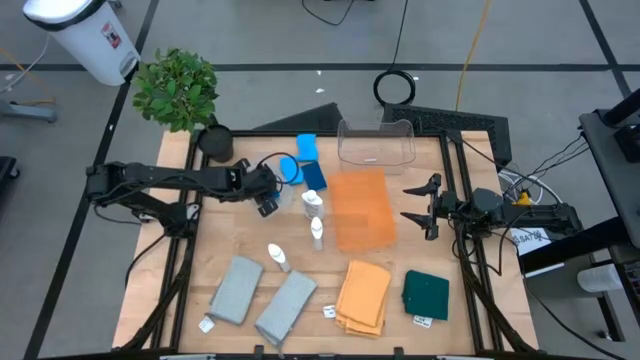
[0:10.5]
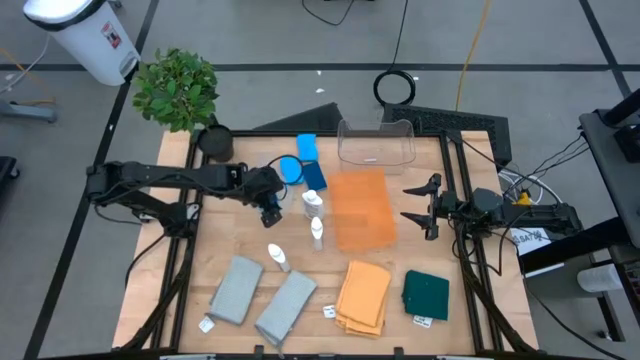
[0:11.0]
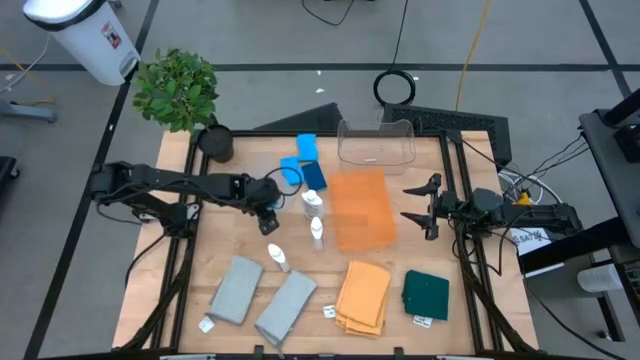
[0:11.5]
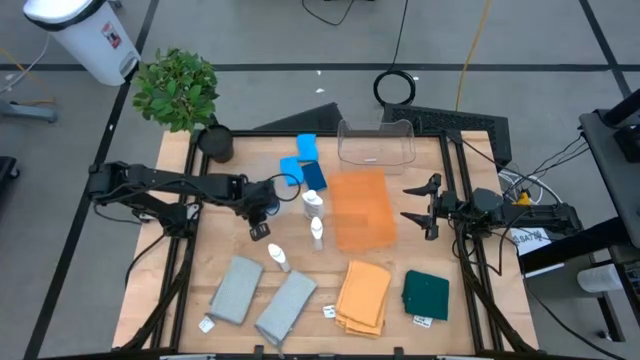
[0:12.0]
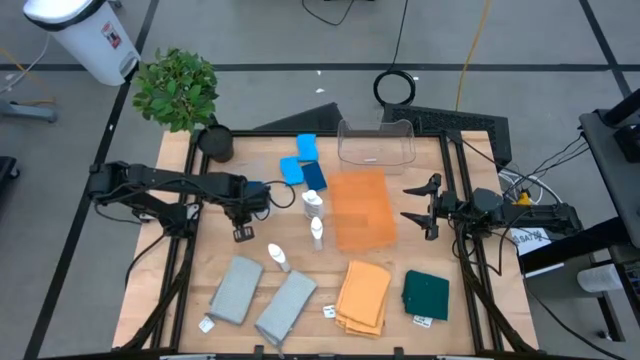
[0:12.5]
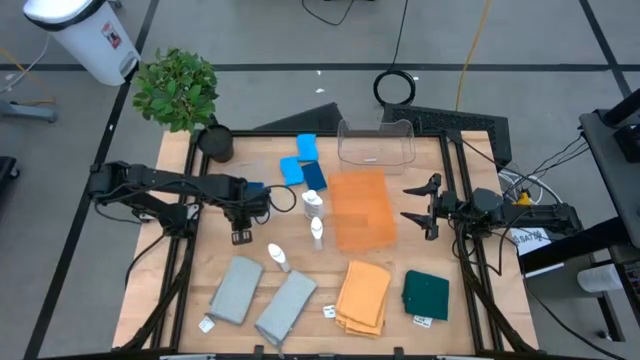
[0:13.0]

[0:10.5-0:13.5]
Task: Pick & Place Kitchen Items
Adjust the white bin

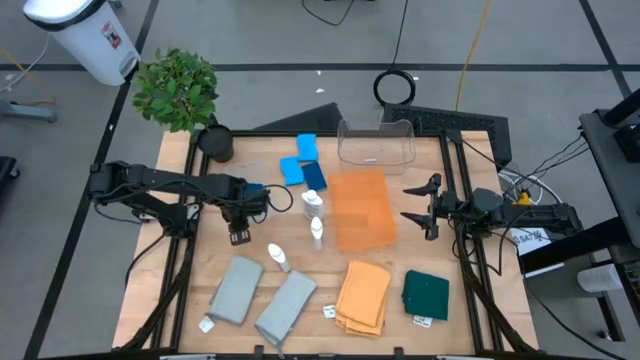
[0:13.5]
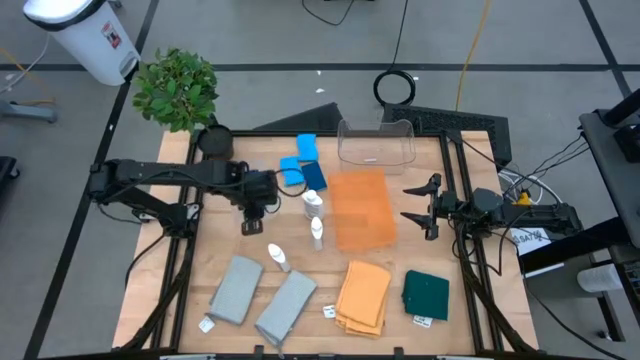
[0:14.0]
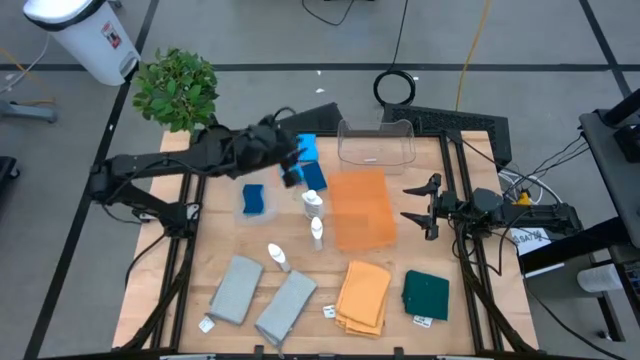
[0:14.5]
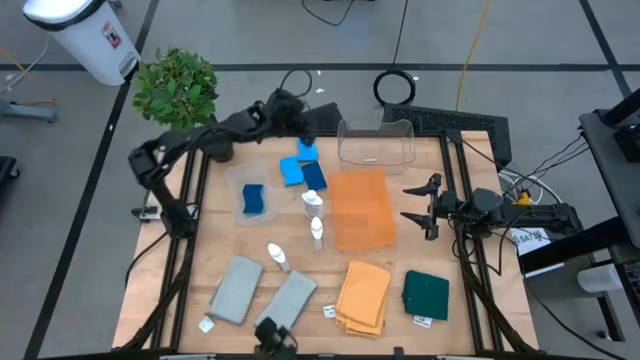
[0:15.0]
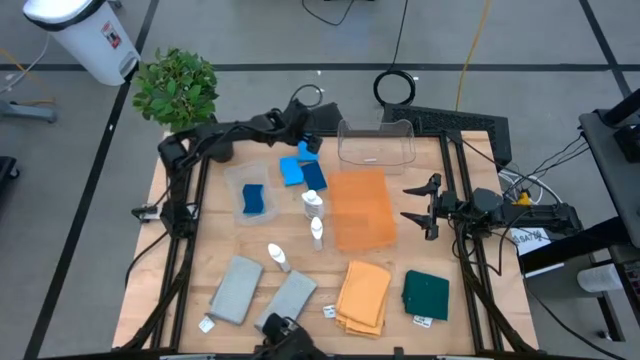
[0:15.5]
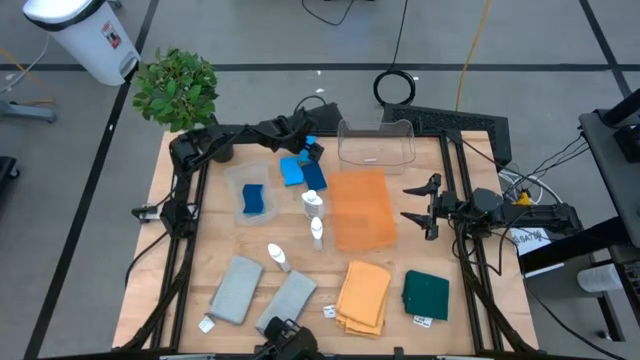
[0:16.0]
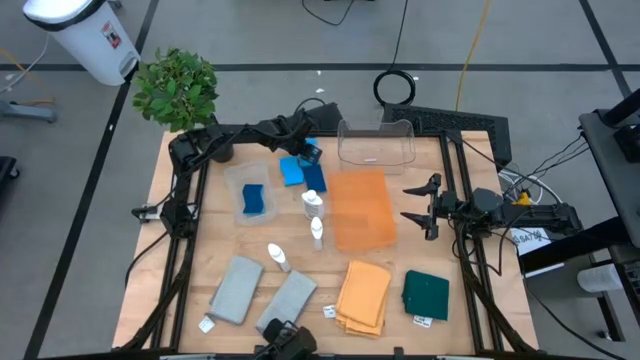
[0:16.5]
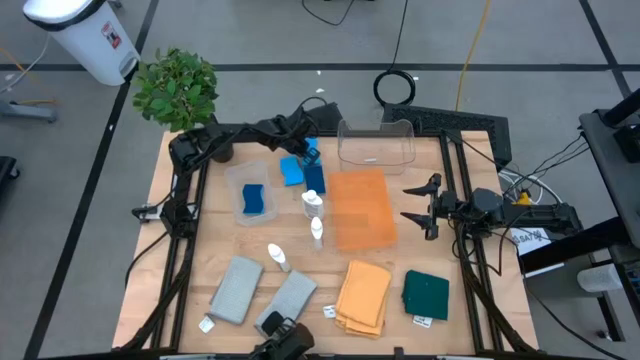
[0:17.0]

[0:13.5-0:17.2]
Put the blue sponge into the white bin

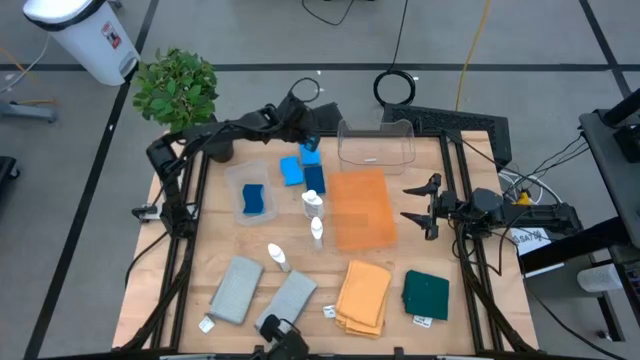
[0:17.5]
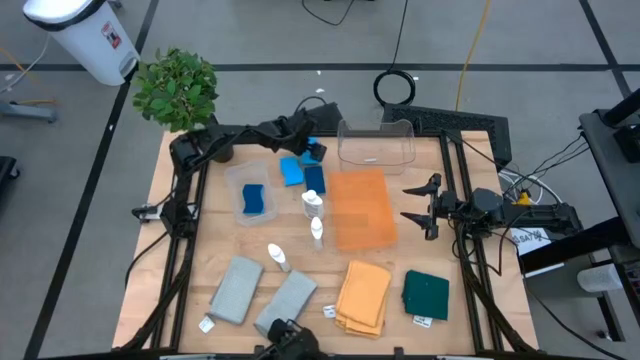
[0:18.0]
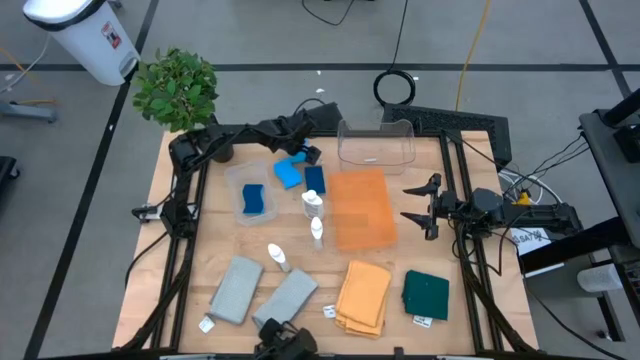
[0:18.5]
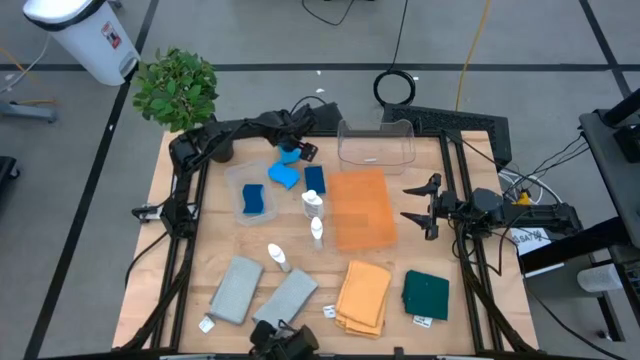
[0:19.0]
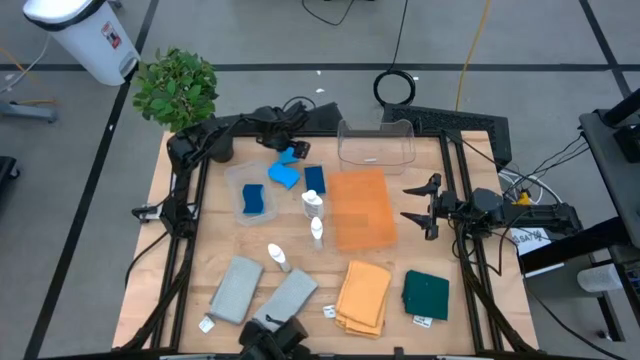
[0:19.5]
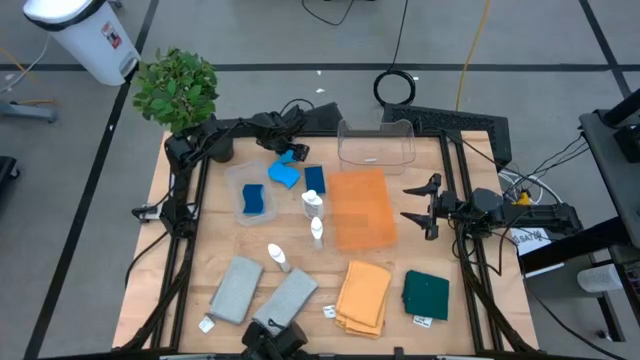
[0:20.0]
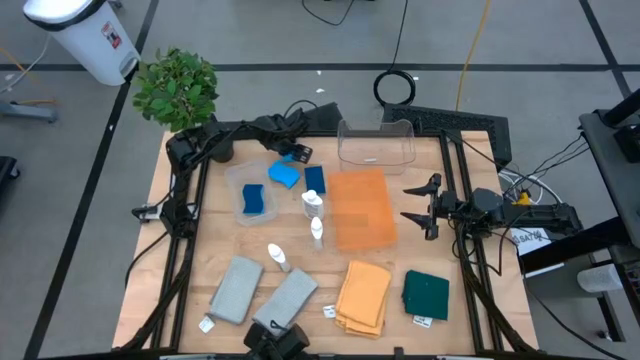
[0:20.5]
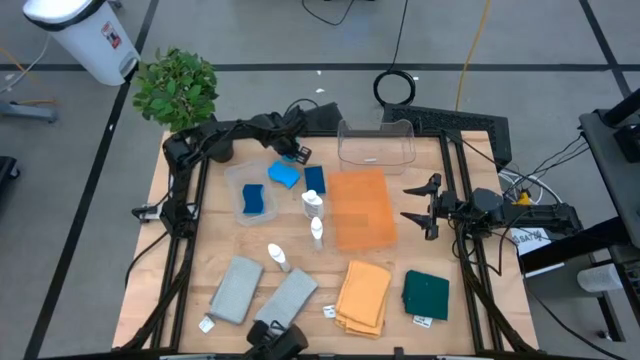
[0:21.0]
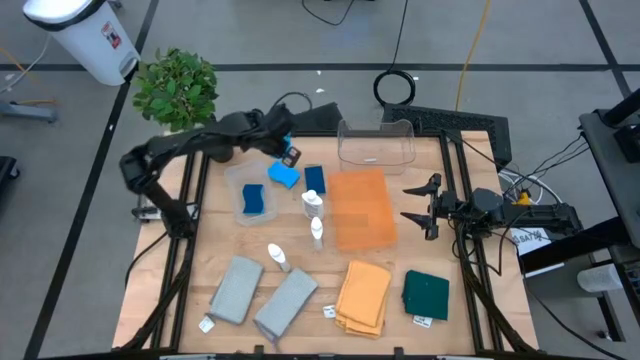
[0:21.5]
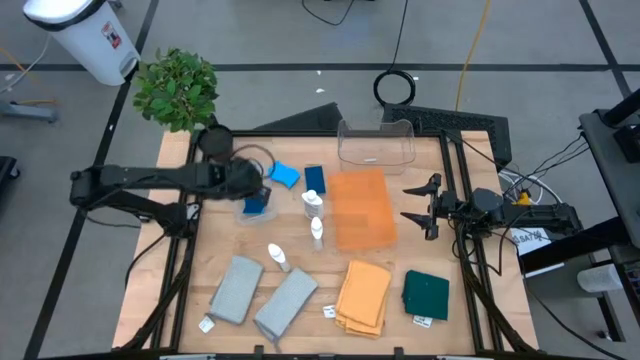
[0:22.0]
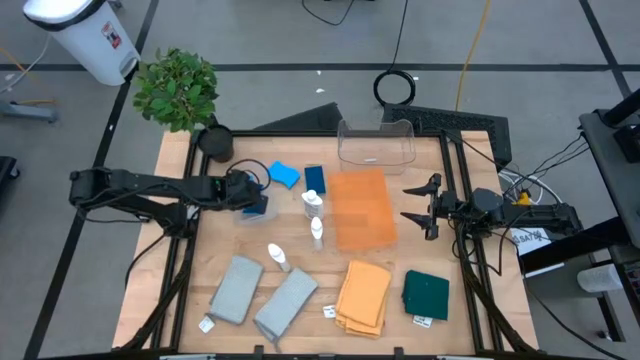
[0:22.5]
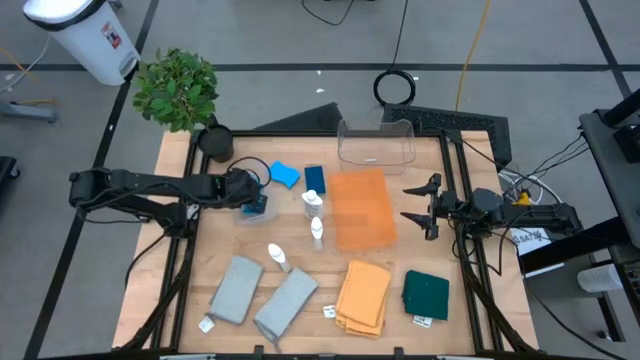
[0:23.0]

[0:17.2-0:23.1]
Put the blue sponge into the white bin

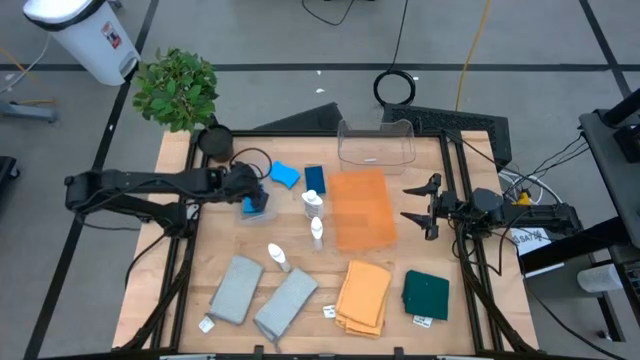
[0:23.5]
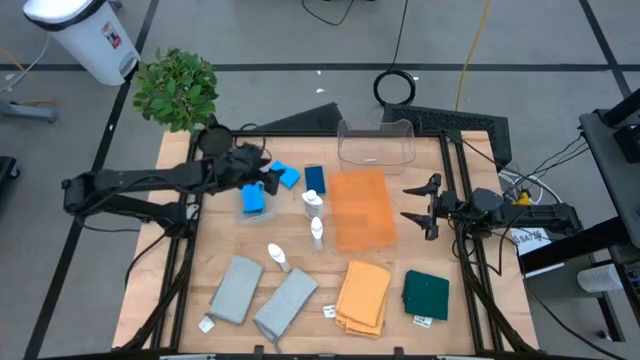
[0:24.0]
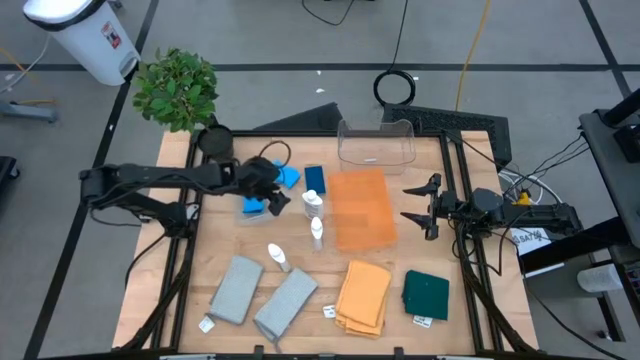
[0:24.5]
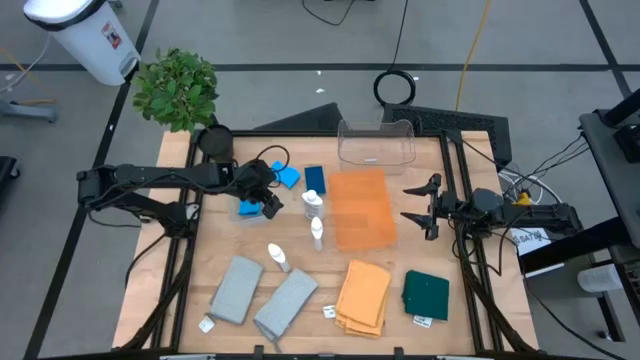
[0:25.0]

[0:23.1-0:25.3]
Adjust the white bin

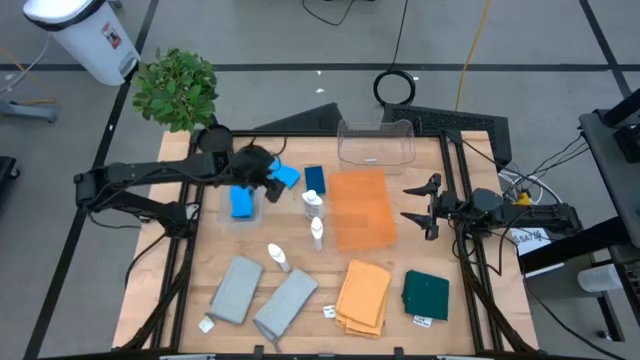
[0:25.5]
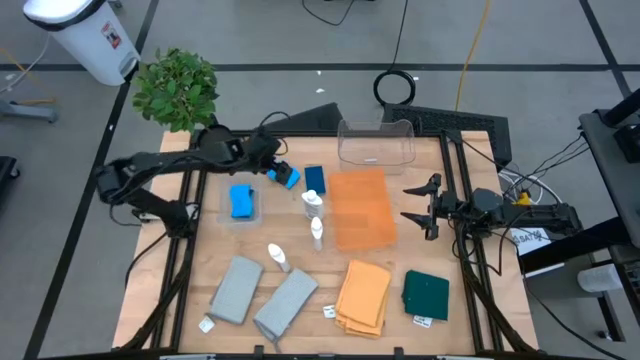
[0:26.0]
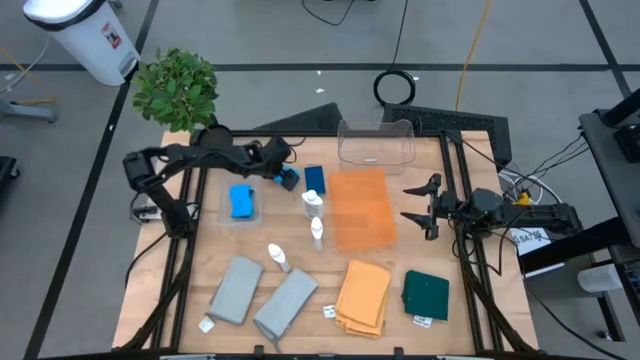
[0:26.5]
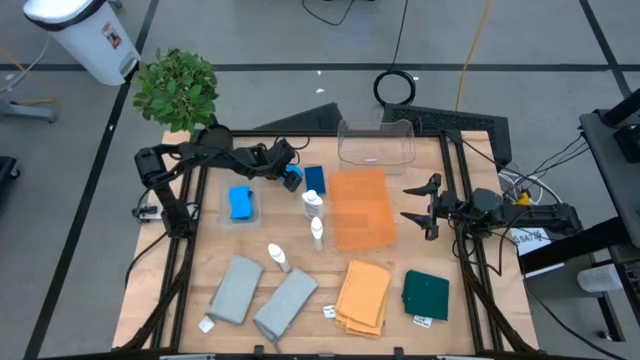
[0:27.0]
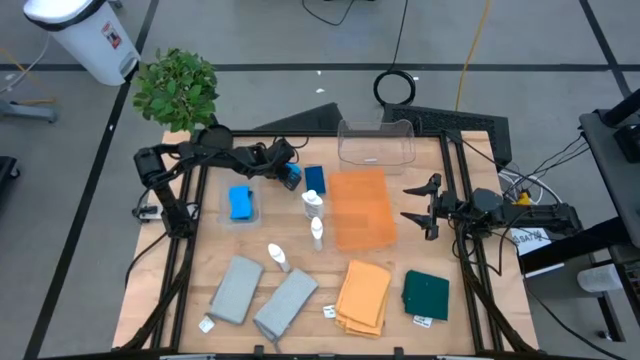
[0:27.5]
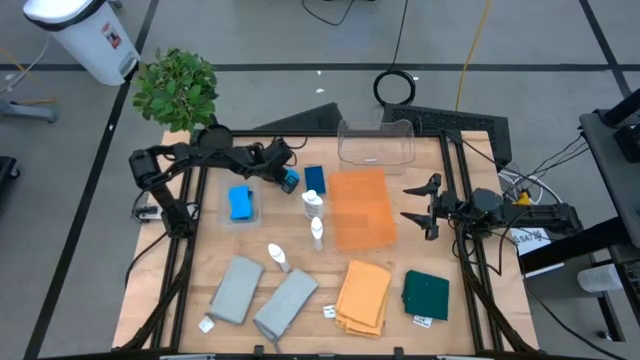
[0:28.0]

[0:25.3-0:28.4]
Put the blue sponge into the white bin

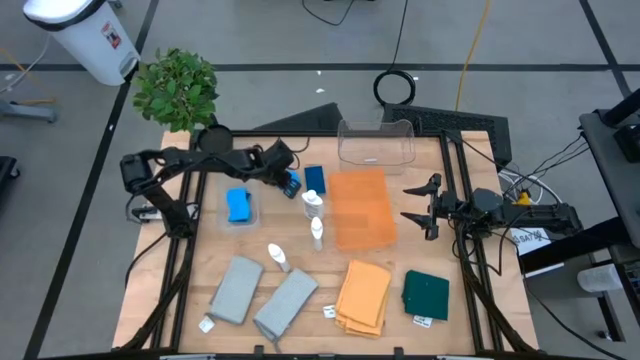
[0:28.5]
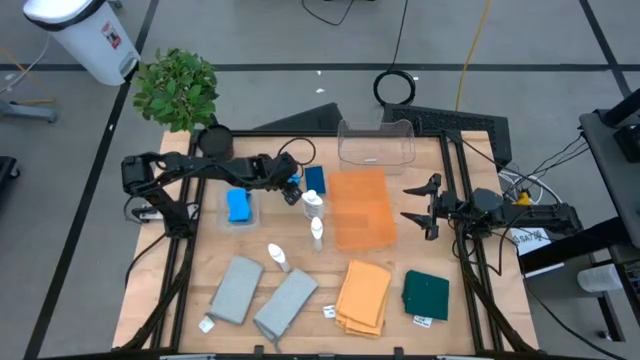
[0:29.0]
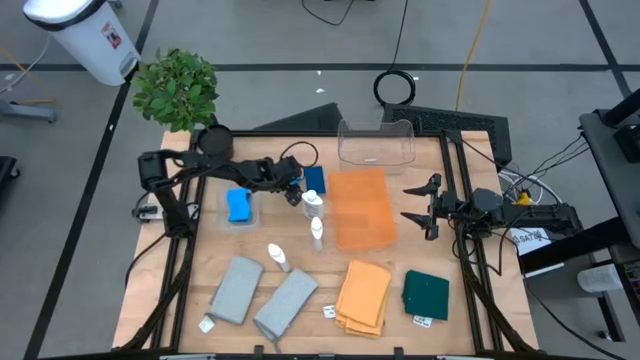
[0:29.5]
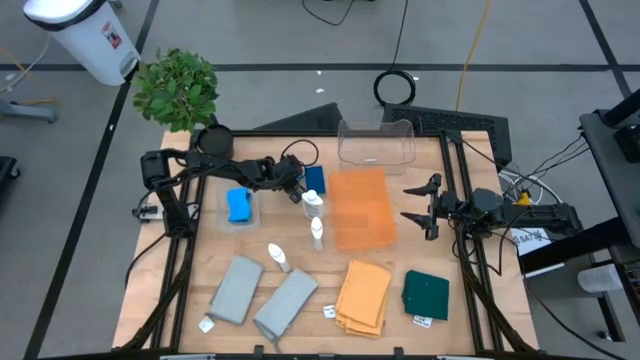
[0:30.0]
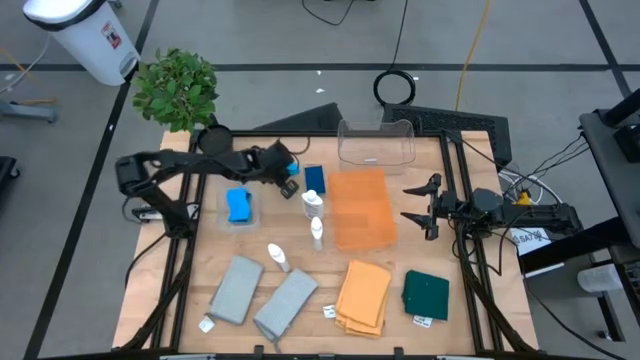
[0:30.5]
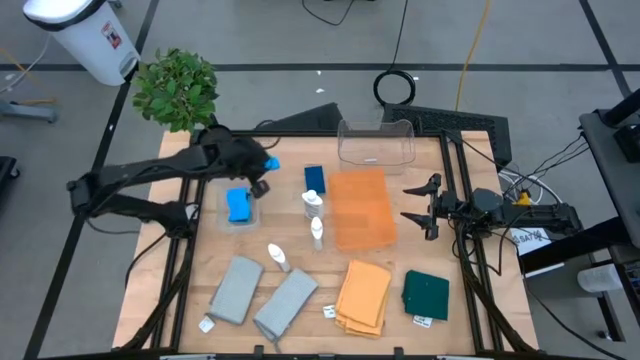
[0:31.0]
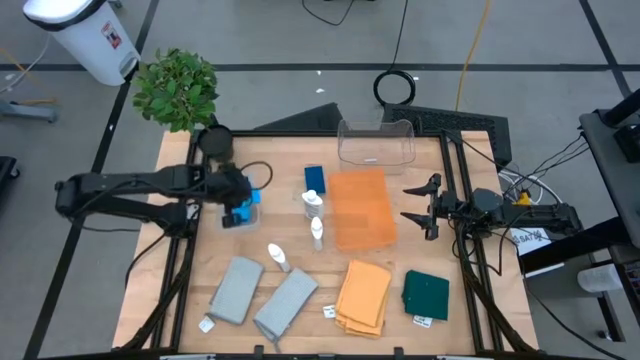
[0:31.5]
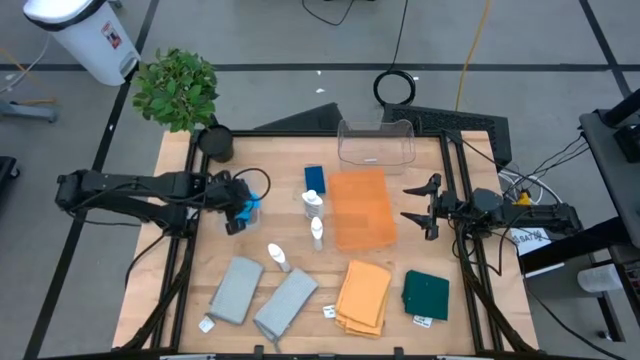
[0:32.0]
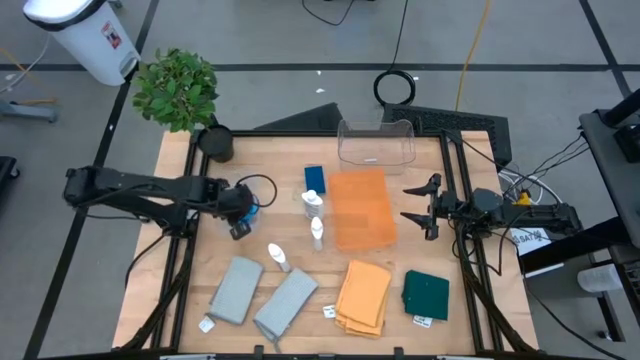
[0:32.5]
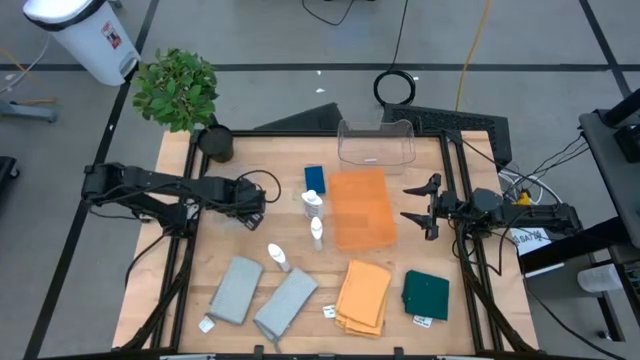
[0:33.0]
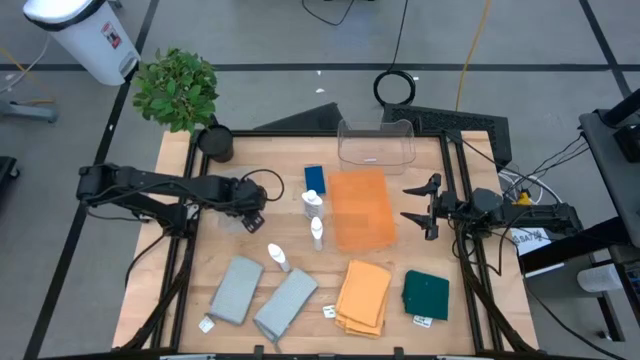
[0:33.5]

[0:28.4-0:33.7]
Put the blue sponge into the white bin
